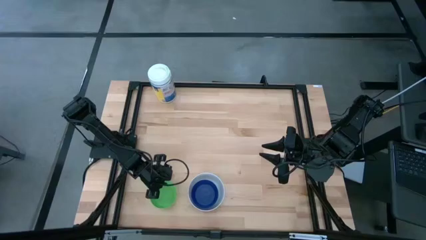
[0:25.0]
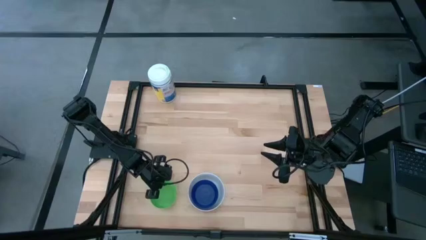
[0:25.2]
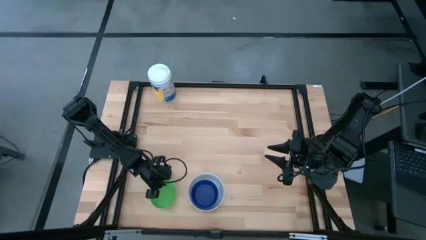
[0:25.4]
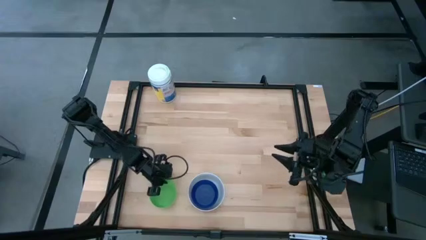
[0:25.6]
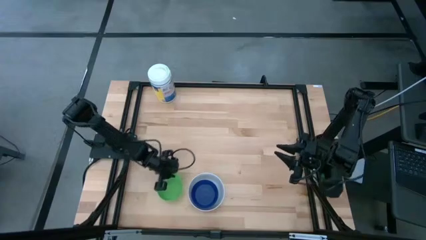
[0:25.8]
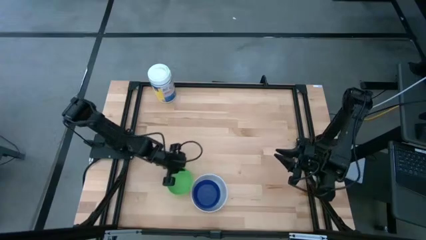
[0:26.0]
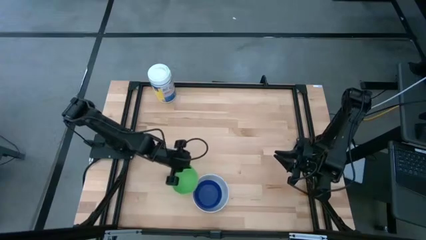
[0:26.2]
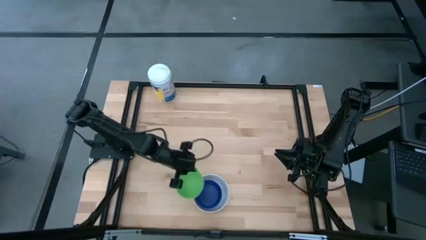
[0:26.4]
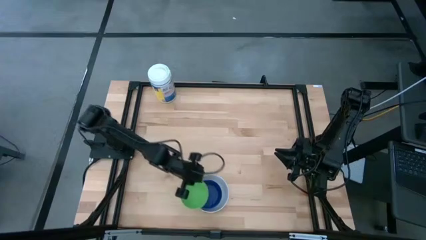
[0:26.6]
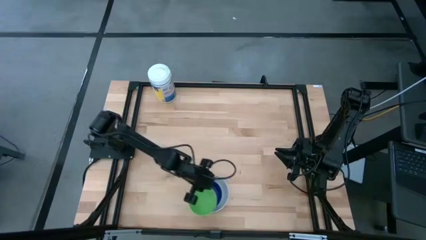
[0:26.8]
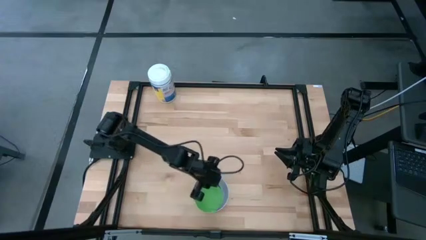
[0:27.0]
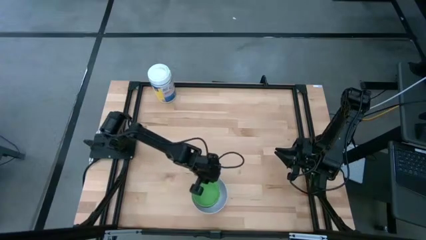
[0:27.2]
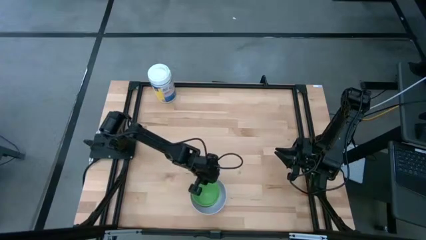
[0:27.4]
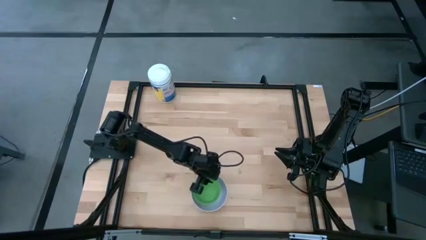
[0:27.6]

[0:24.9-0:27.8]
Stack the green bowl on top of the blue bowl

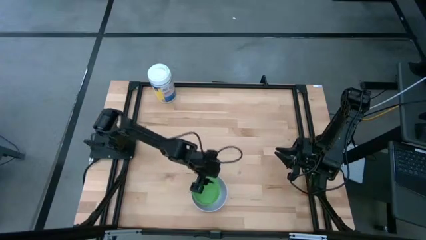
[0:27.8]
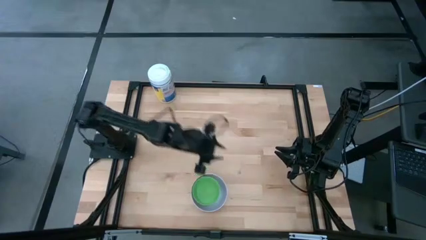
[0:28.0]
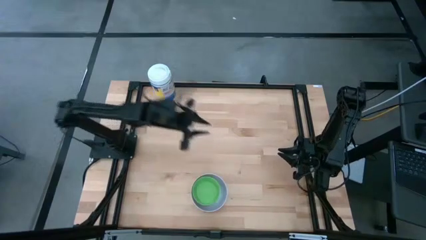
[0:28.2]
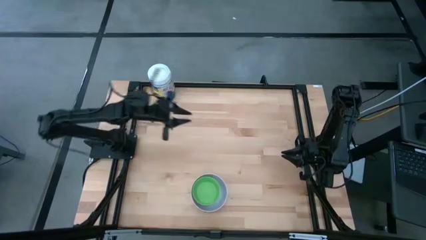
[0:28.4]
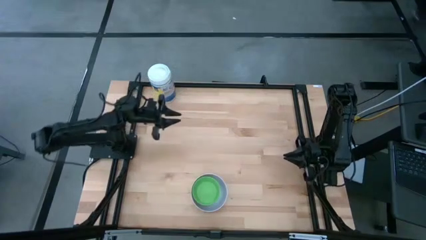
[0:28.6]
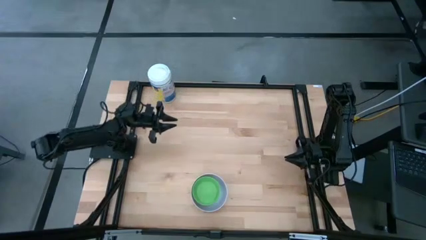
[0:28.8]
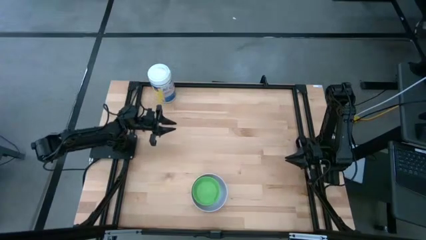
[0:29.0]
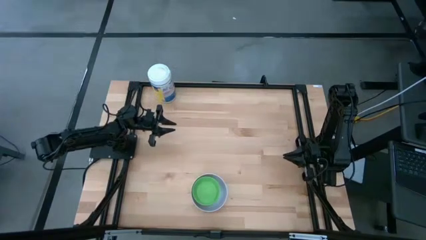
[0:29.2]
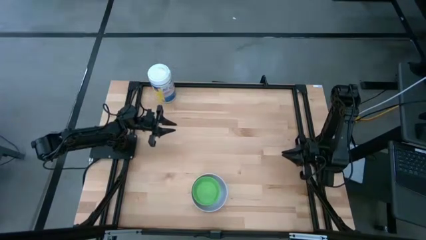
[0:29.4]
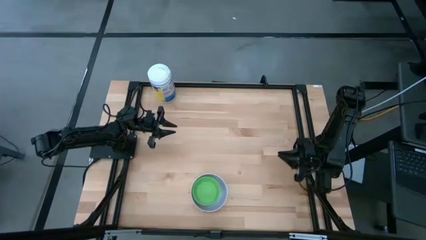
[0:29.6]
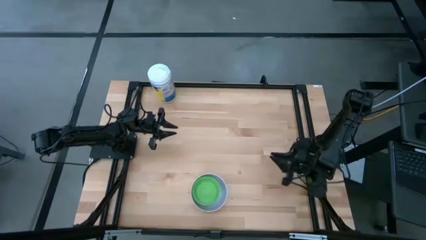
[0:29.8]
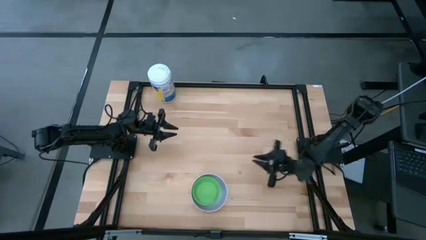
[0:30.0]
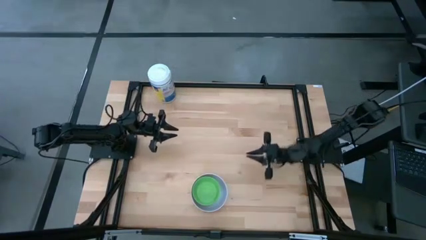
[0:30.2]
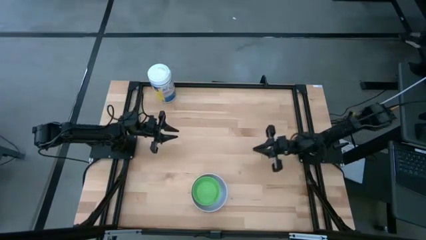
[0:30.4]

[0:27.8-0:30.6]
Return to Home Position
